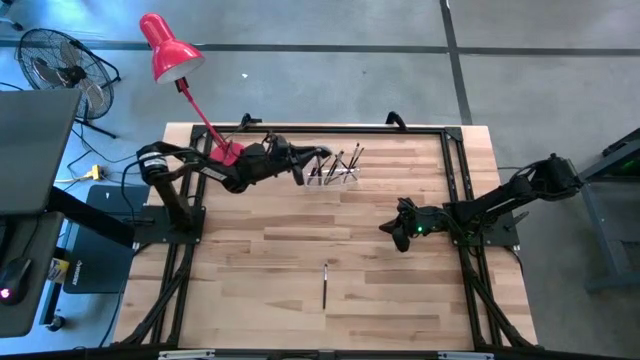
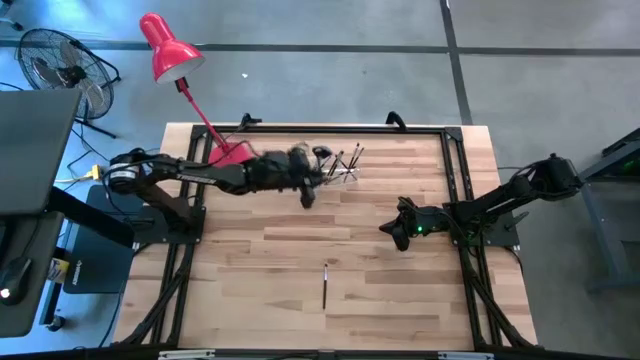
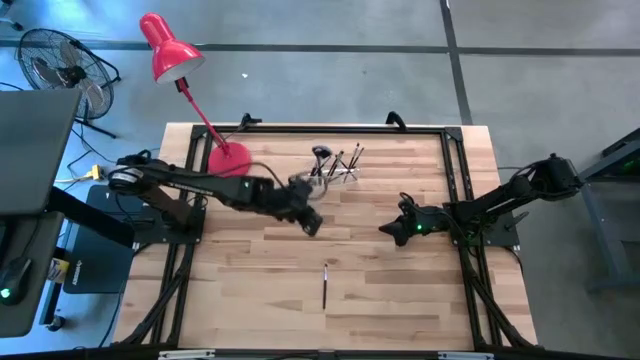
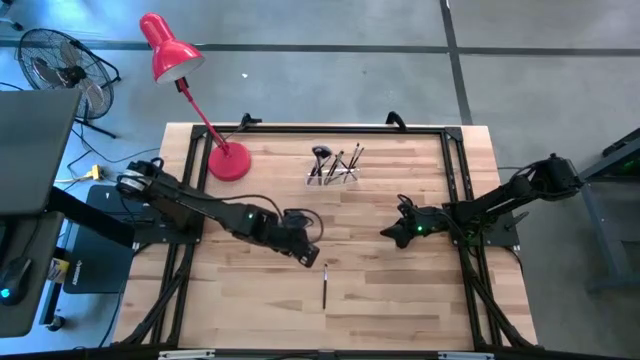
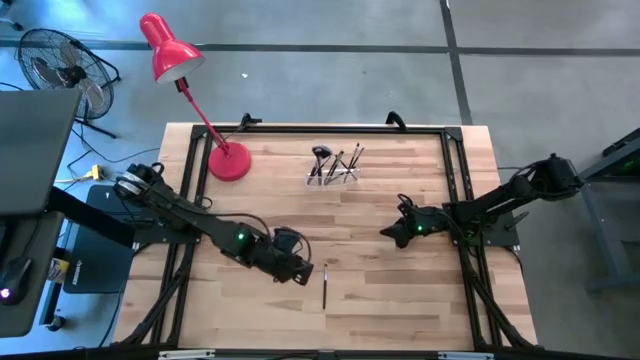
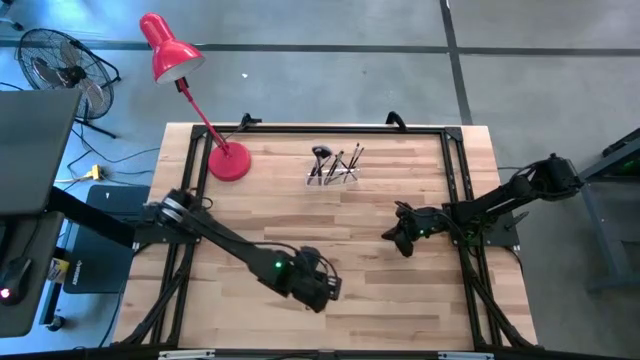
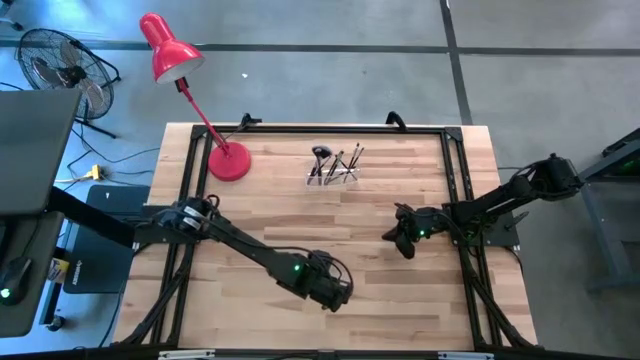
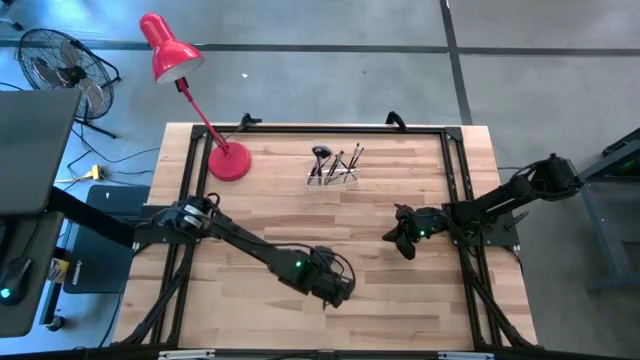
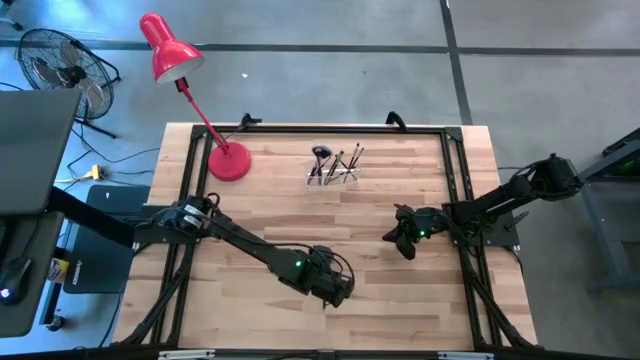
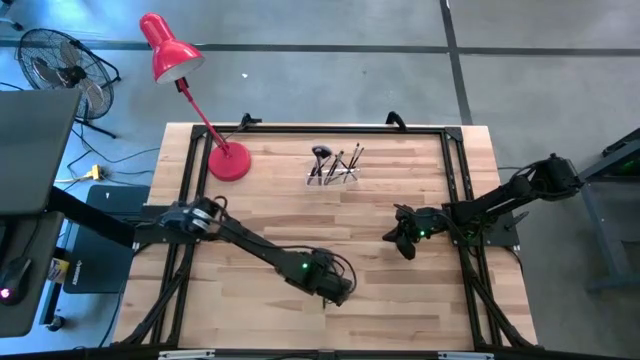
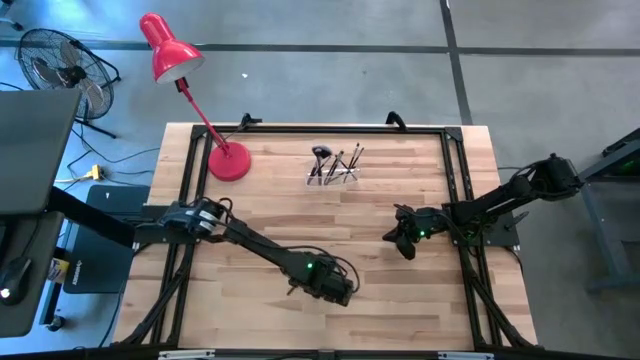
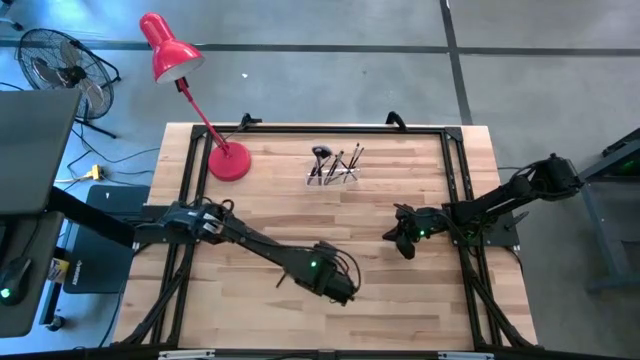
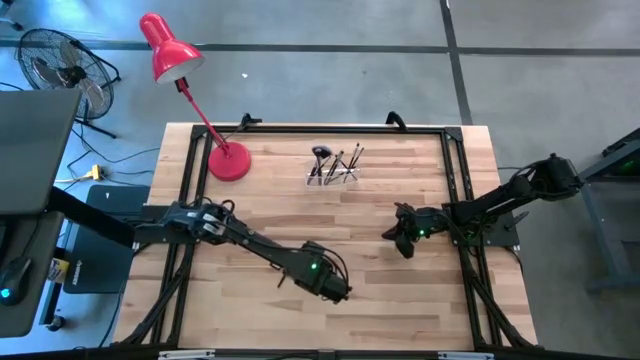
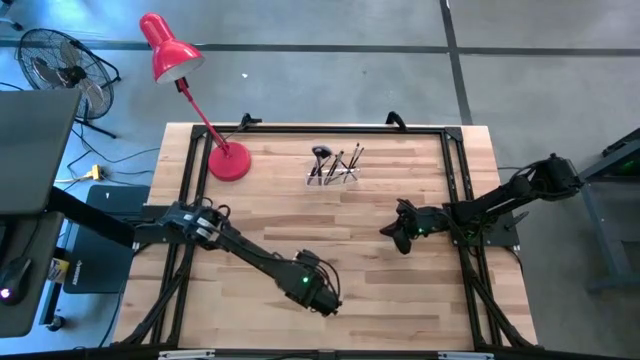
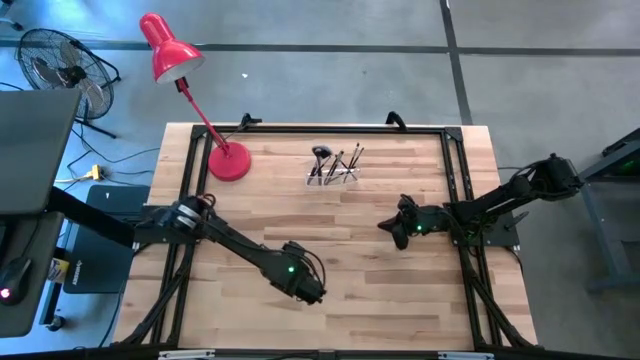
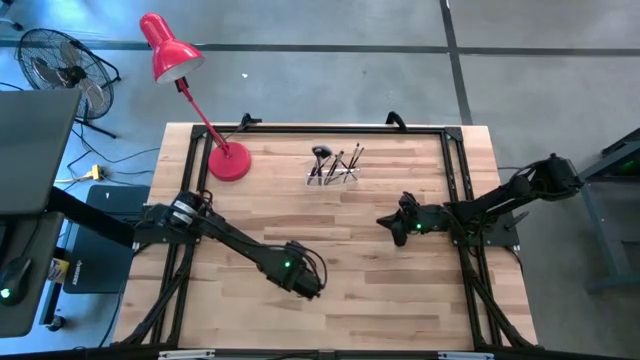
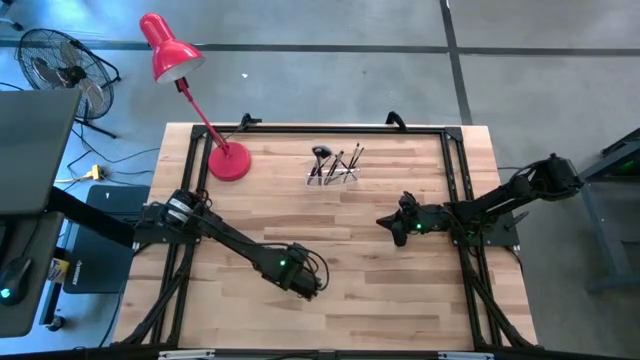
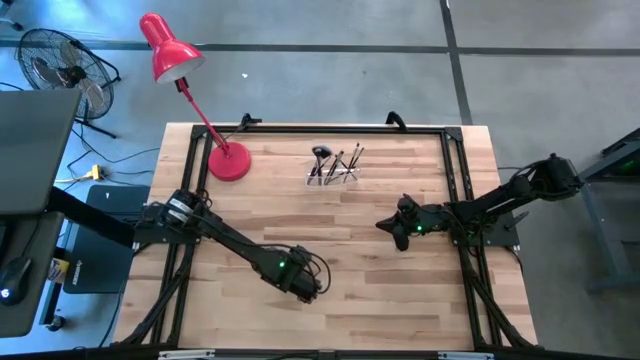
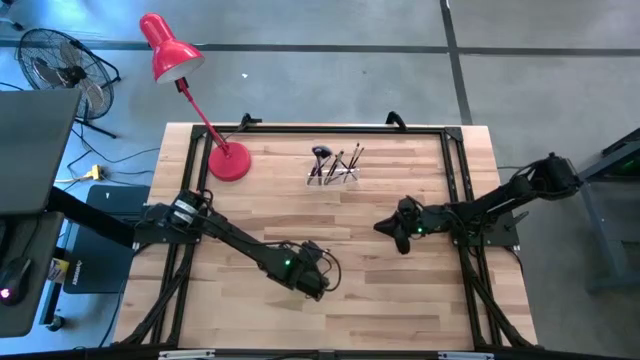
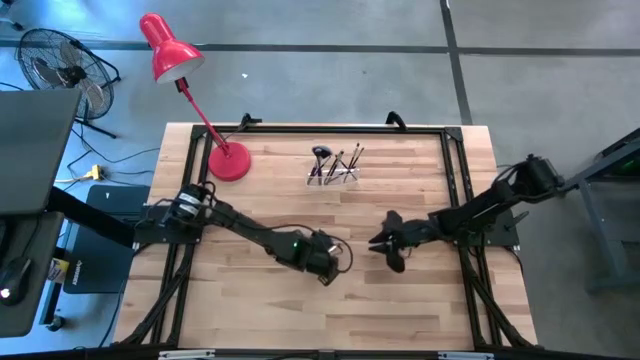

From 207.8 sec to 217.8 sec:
Task: Put items in baskets/containers
Put the foundation brush into the transparent organizer

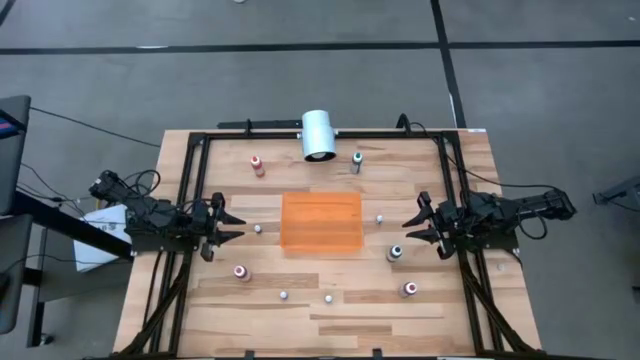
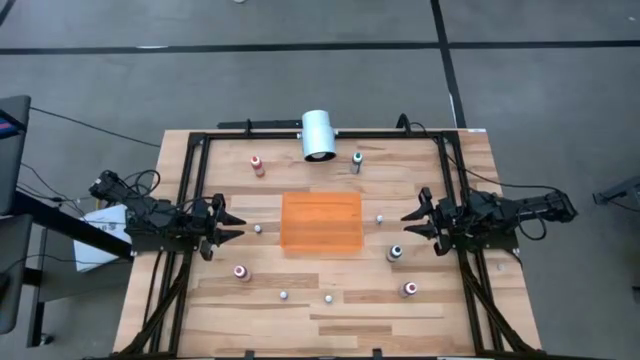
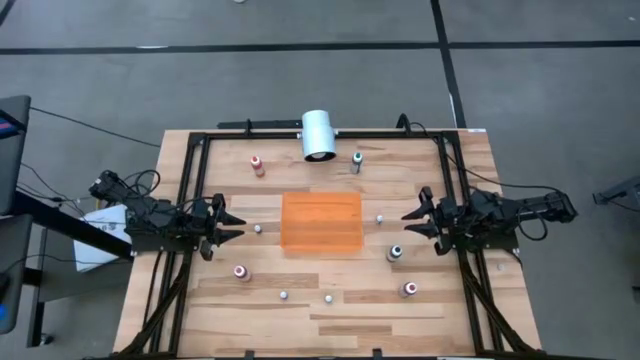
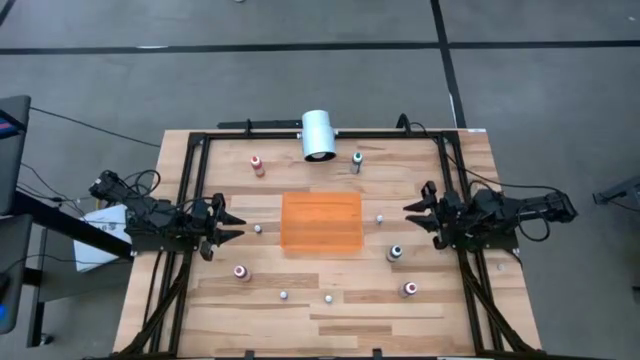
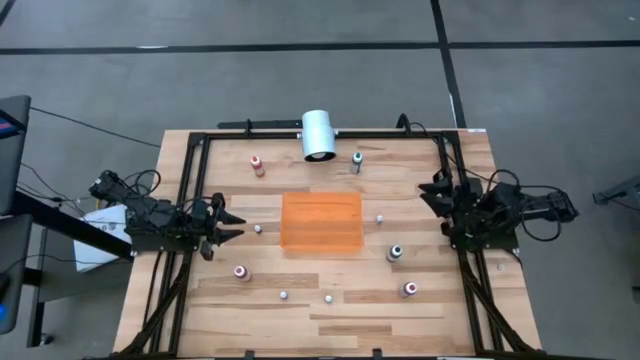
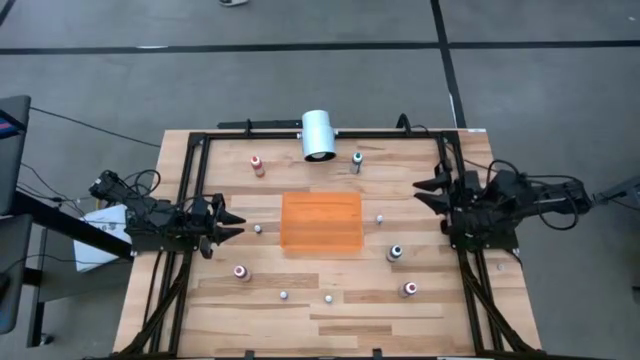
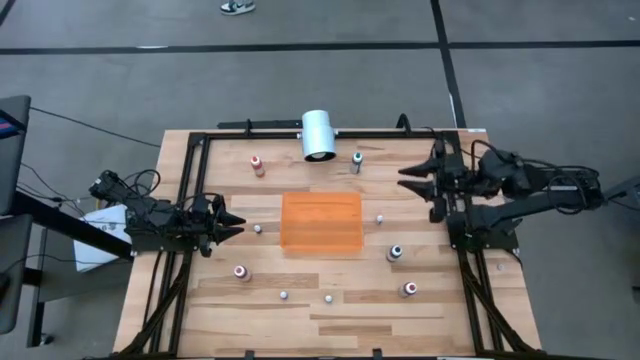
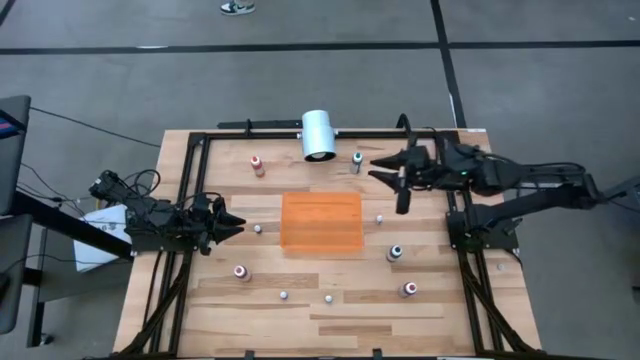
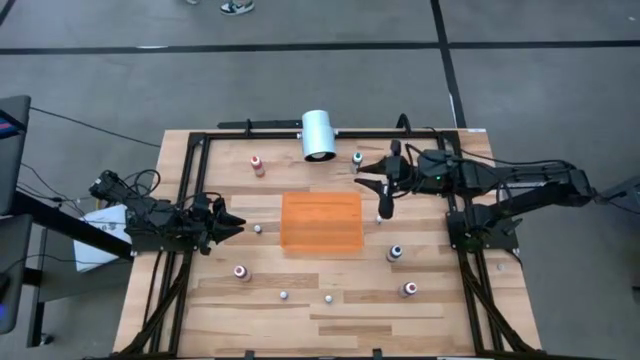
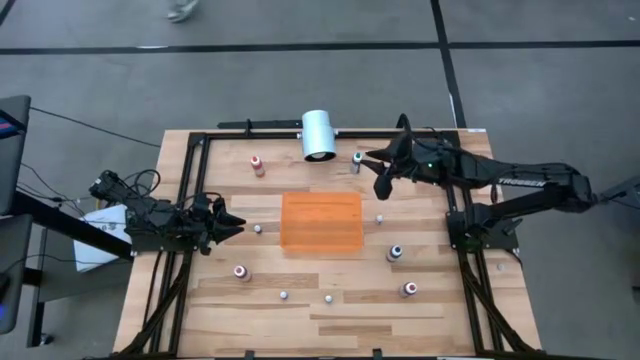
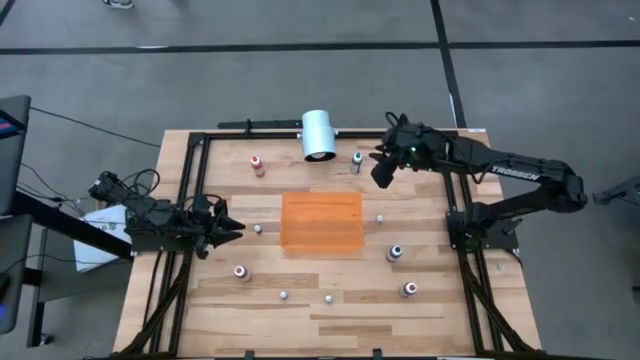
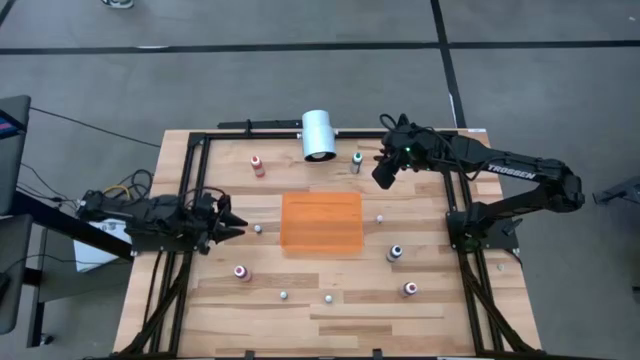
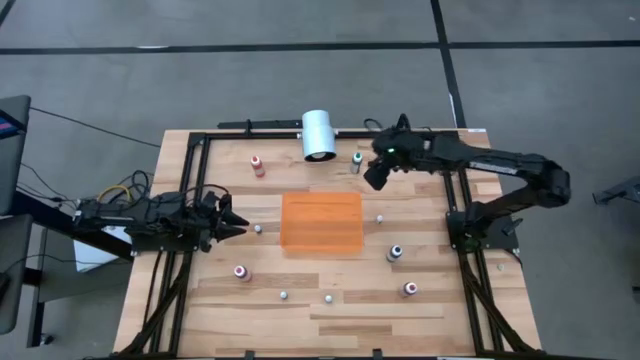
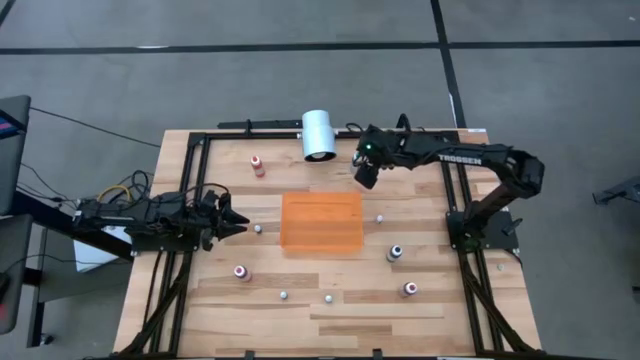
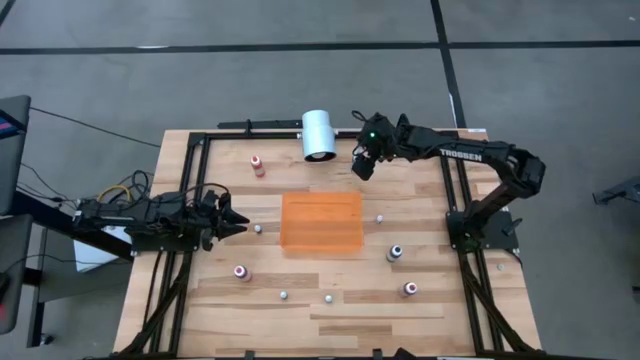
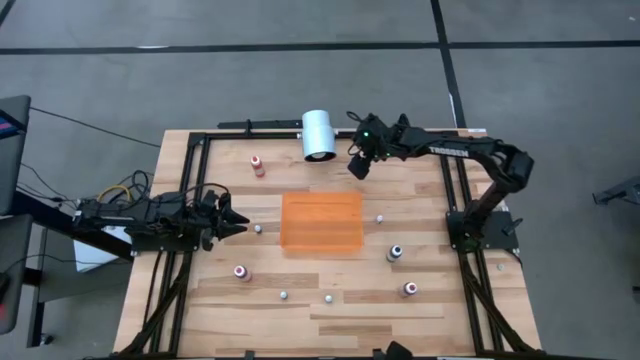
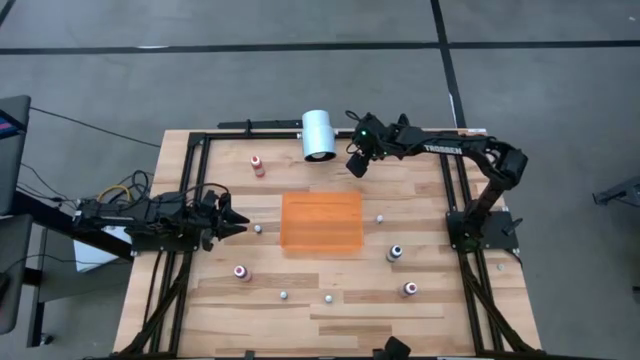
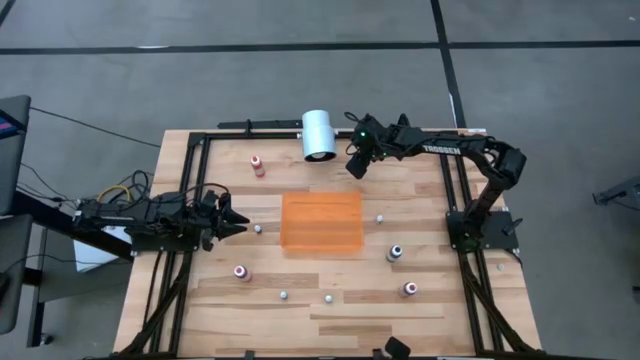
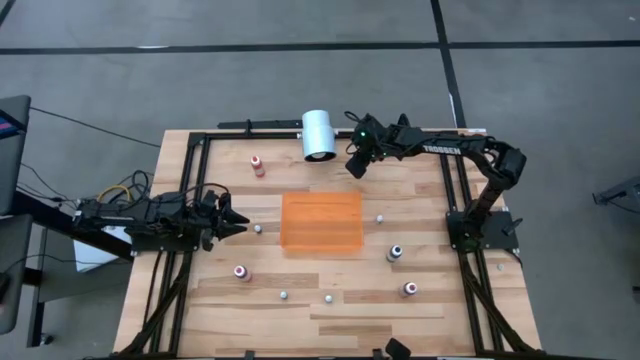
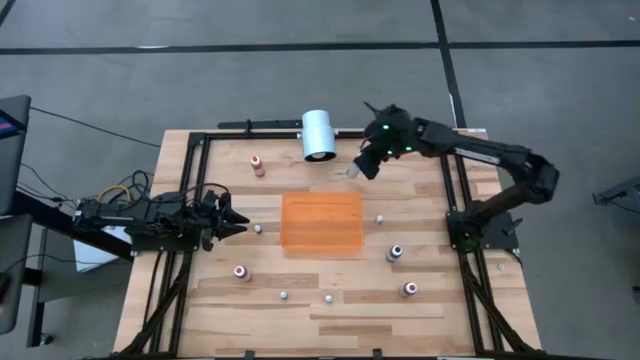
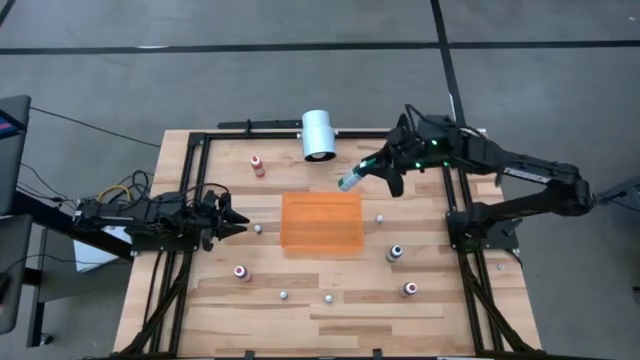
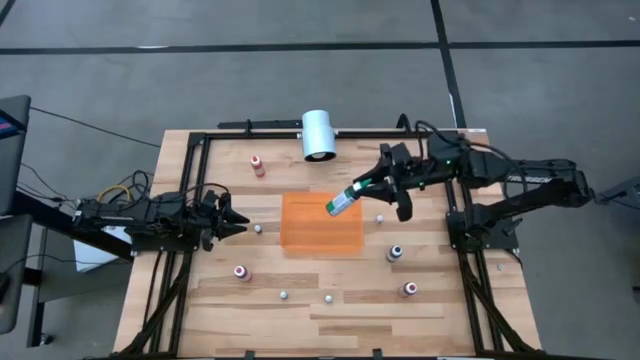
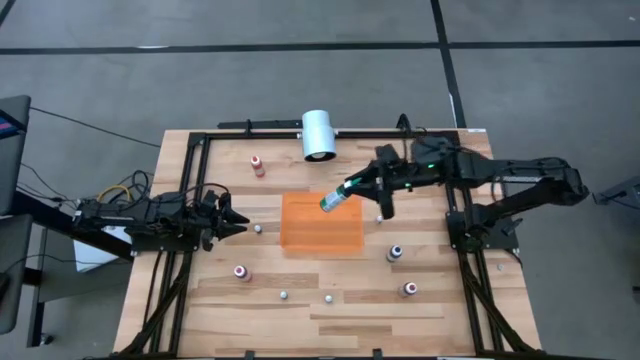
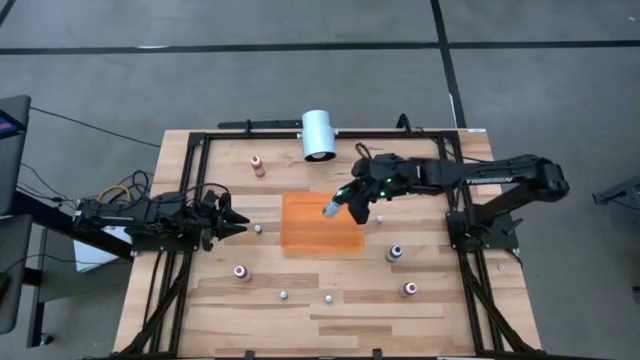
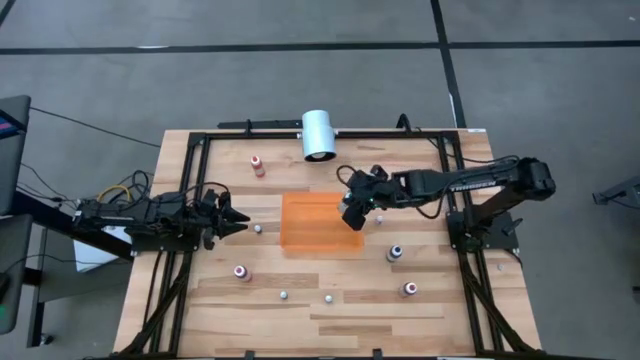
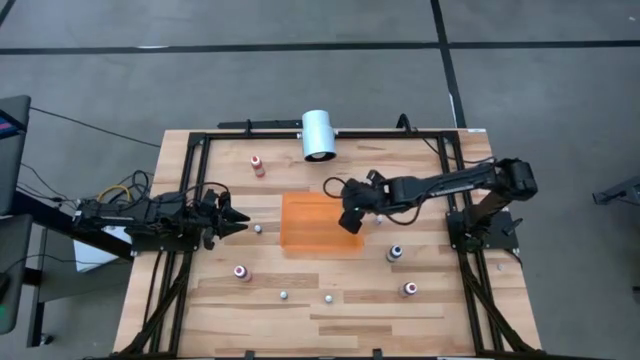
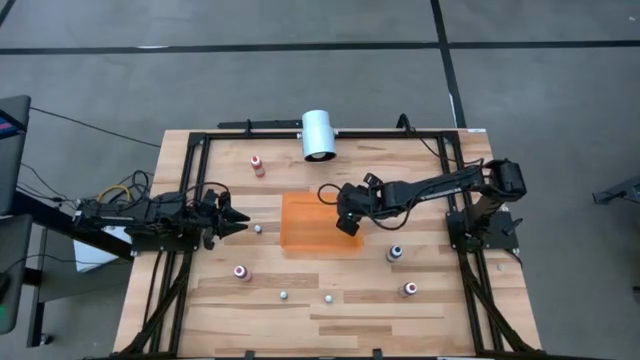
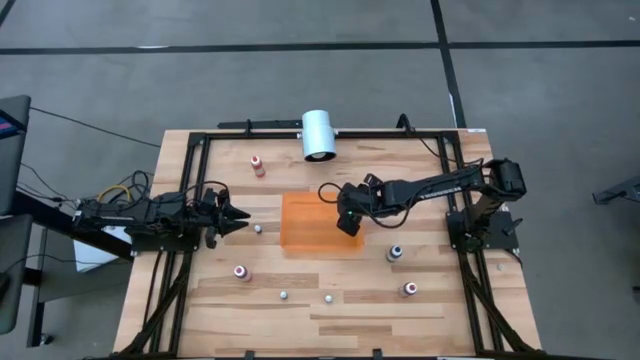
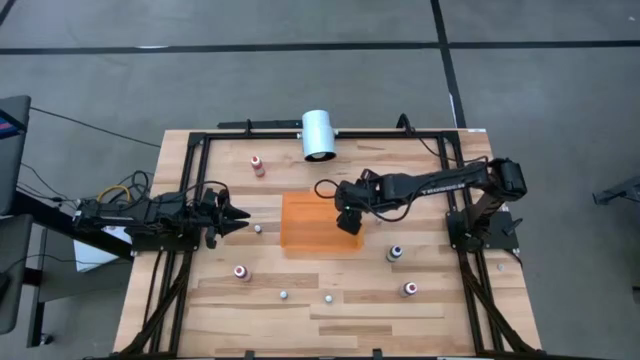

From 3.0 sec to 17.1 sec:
Task: Pick & Place food coloring
Put the large green food coloring bottle into the orange bin
